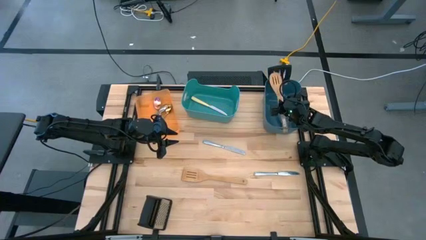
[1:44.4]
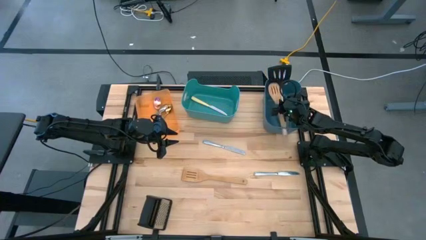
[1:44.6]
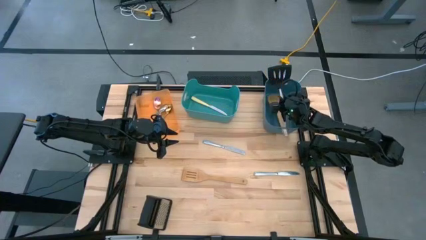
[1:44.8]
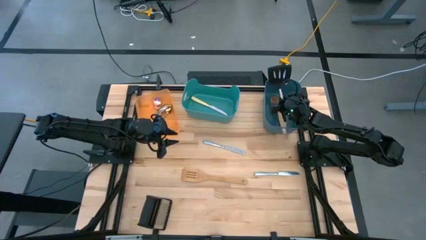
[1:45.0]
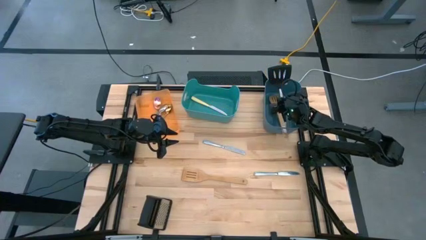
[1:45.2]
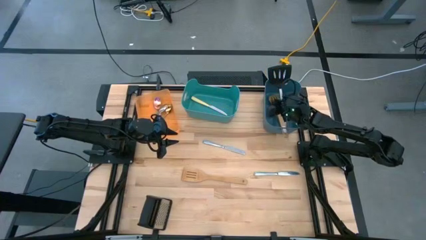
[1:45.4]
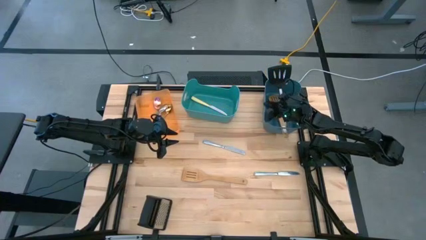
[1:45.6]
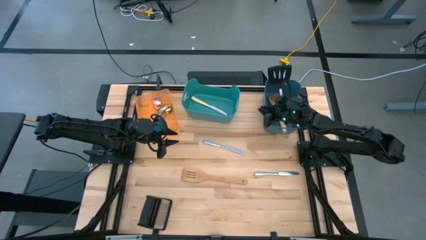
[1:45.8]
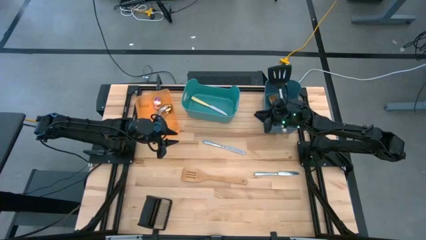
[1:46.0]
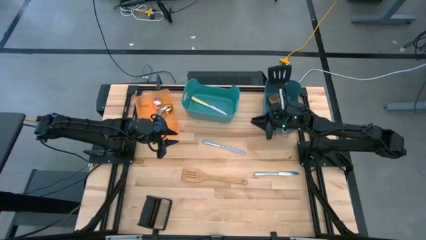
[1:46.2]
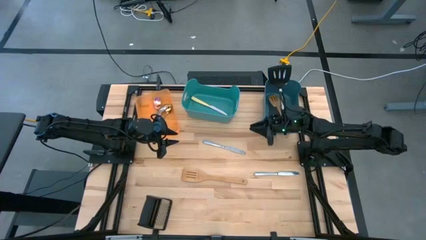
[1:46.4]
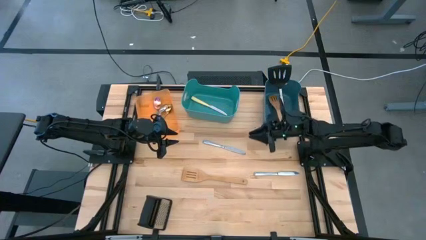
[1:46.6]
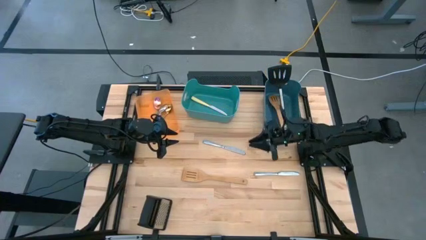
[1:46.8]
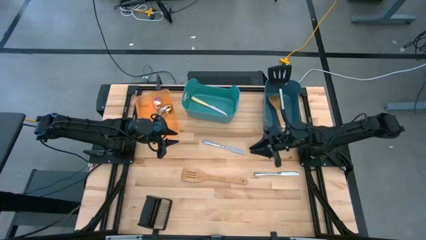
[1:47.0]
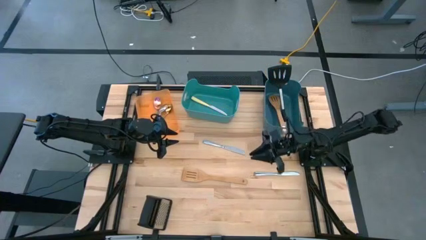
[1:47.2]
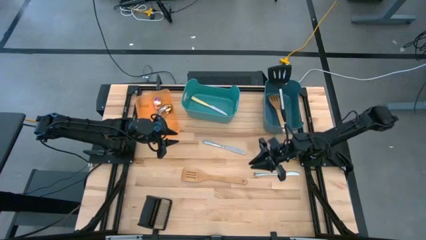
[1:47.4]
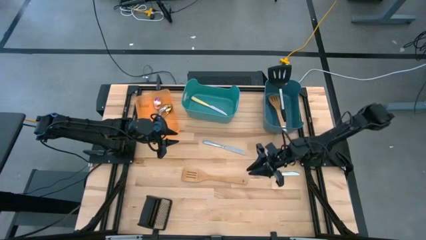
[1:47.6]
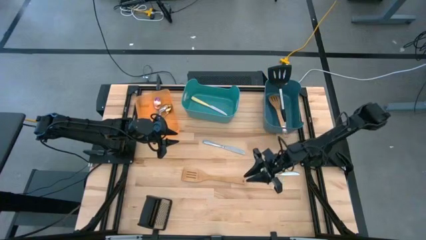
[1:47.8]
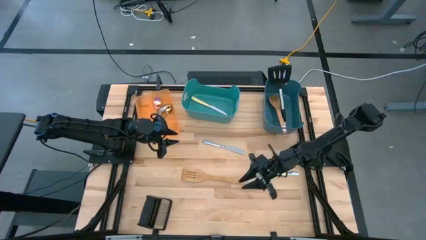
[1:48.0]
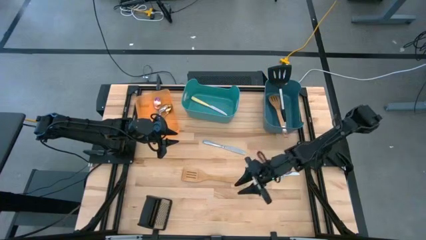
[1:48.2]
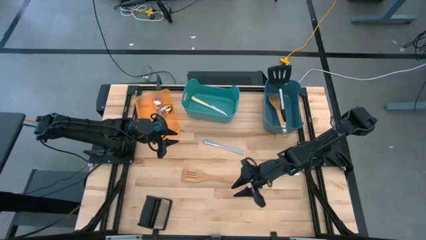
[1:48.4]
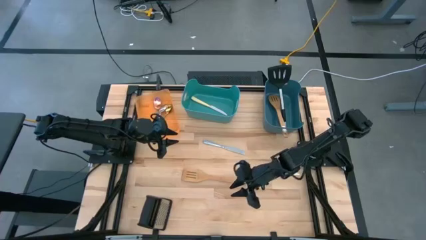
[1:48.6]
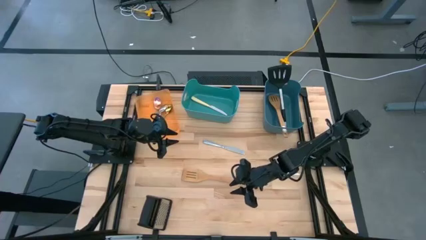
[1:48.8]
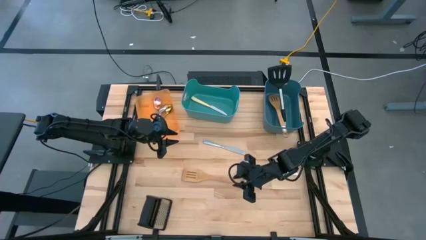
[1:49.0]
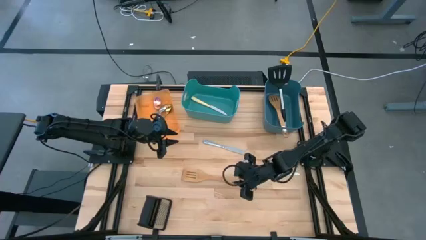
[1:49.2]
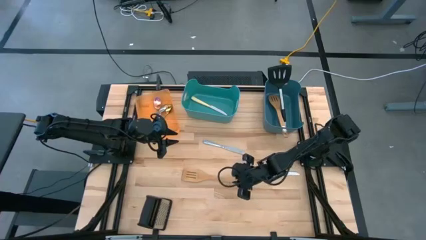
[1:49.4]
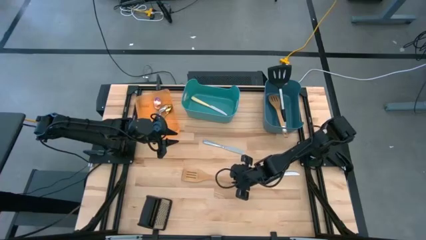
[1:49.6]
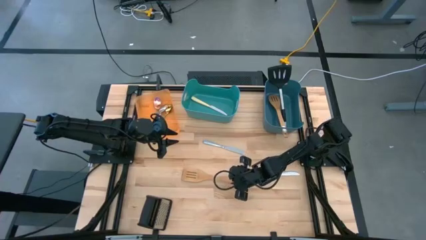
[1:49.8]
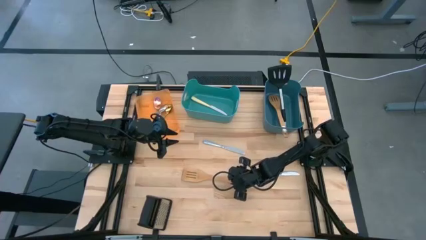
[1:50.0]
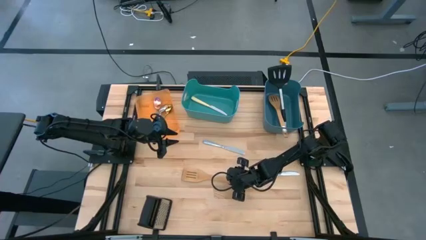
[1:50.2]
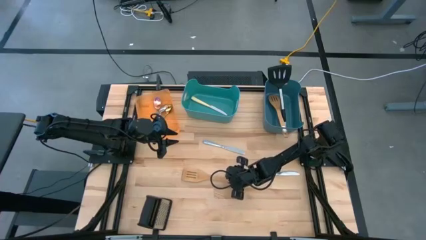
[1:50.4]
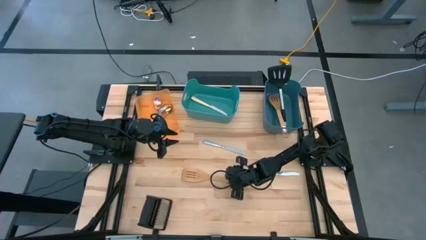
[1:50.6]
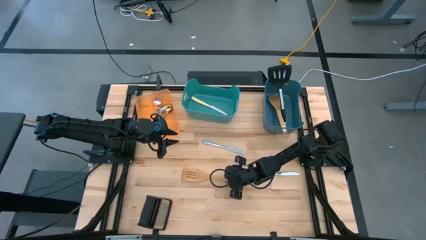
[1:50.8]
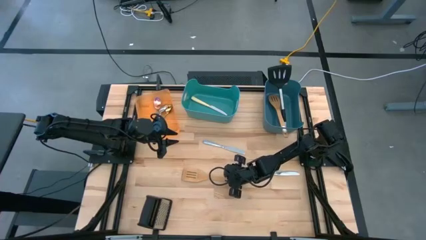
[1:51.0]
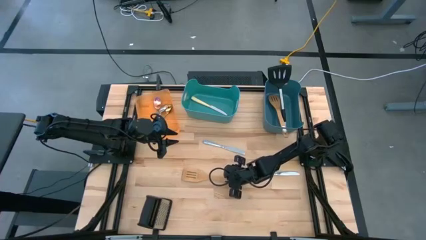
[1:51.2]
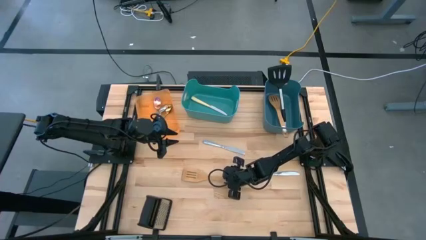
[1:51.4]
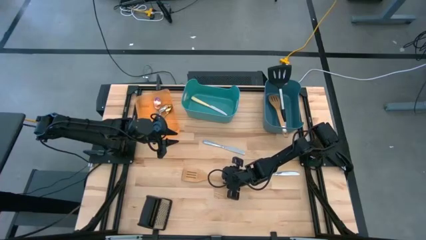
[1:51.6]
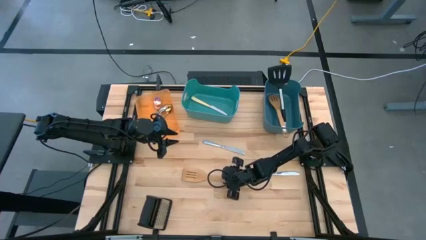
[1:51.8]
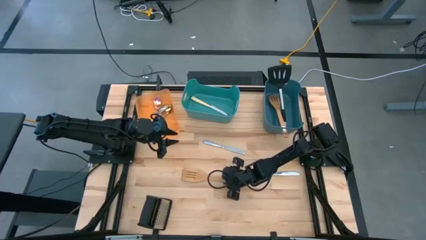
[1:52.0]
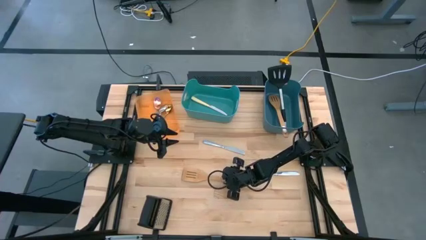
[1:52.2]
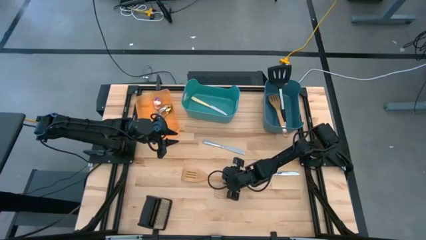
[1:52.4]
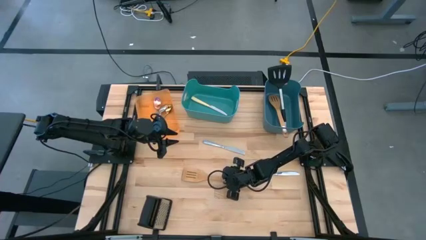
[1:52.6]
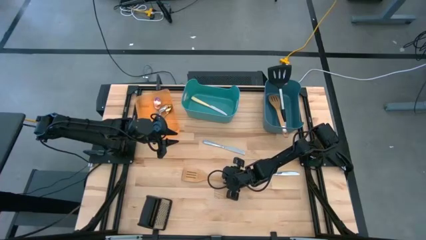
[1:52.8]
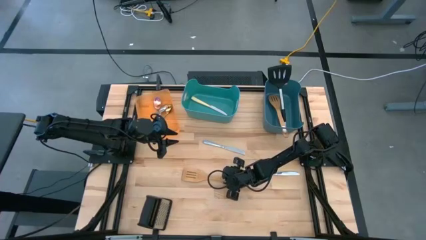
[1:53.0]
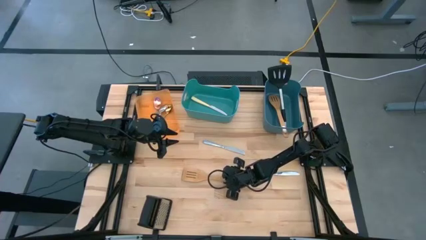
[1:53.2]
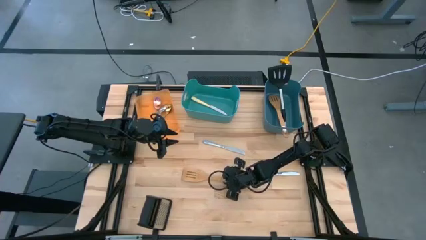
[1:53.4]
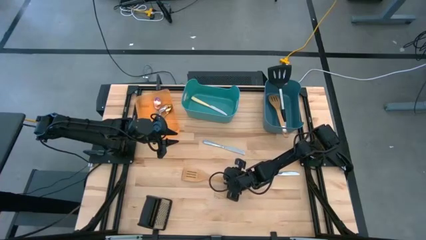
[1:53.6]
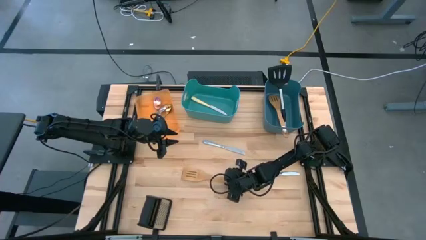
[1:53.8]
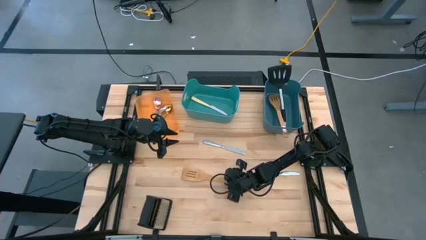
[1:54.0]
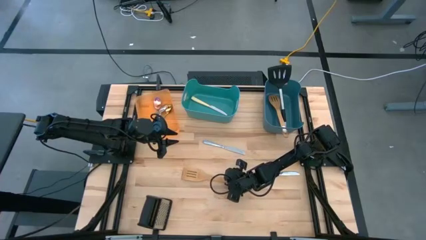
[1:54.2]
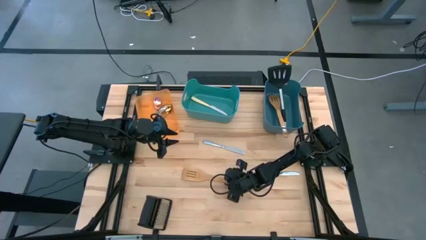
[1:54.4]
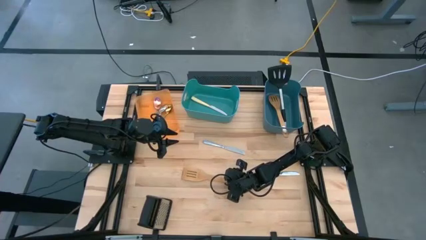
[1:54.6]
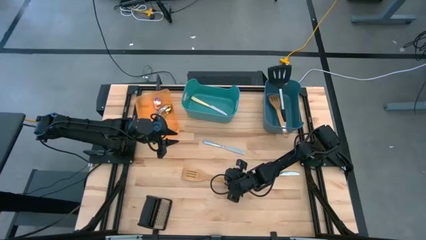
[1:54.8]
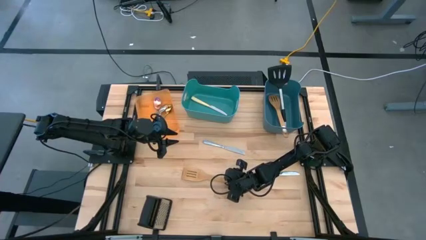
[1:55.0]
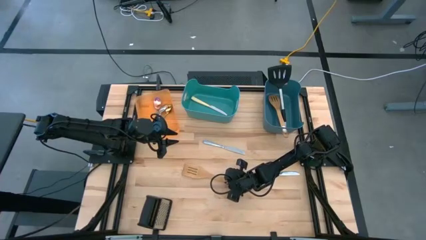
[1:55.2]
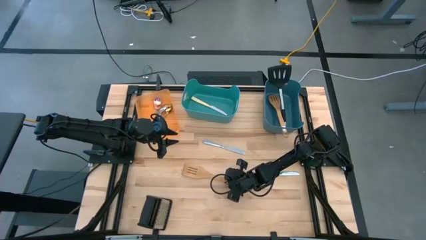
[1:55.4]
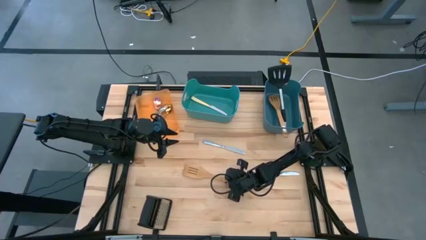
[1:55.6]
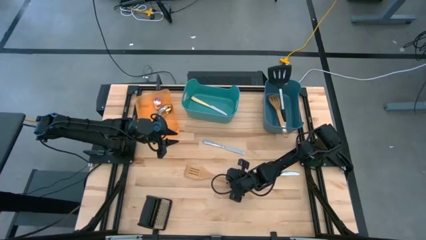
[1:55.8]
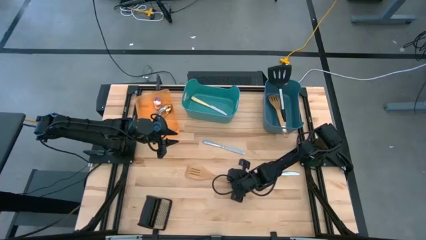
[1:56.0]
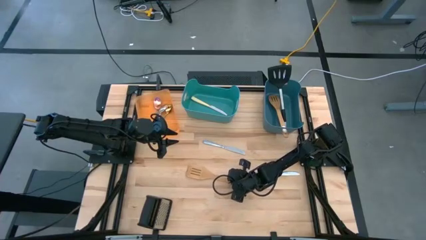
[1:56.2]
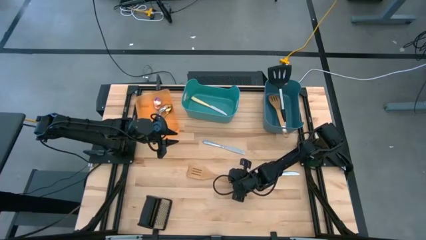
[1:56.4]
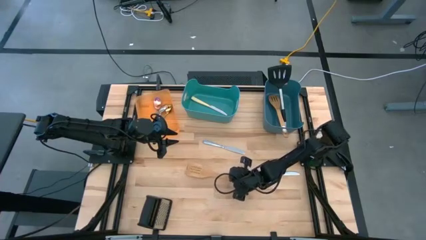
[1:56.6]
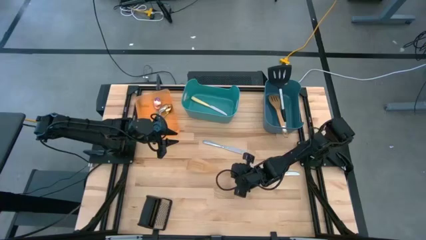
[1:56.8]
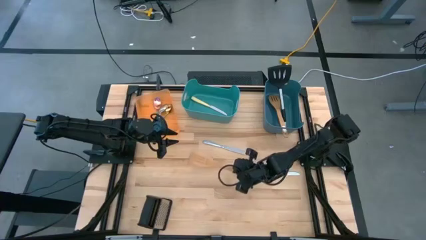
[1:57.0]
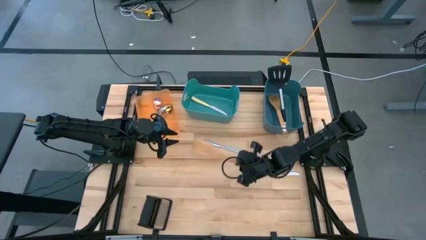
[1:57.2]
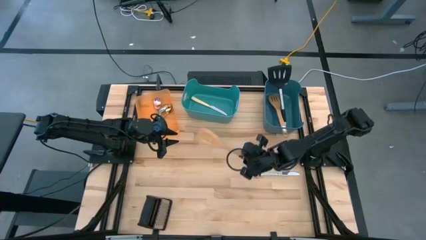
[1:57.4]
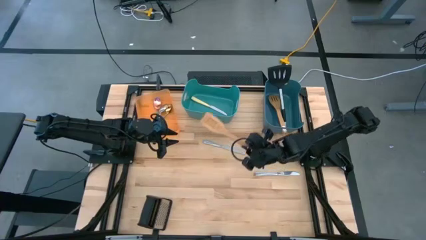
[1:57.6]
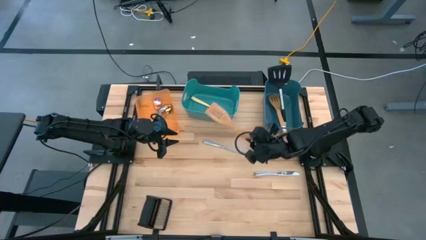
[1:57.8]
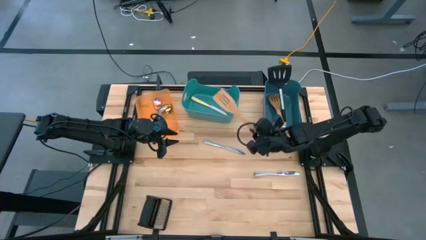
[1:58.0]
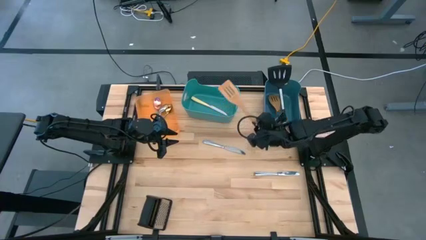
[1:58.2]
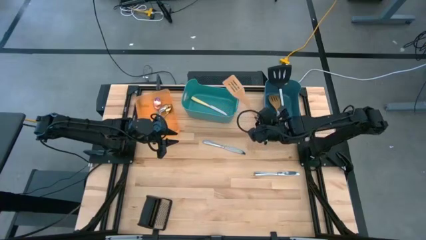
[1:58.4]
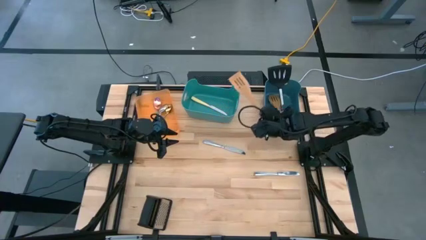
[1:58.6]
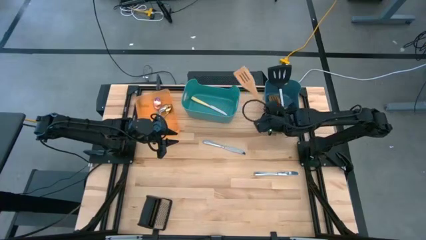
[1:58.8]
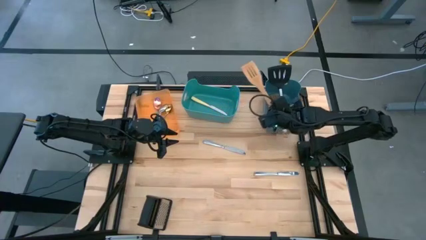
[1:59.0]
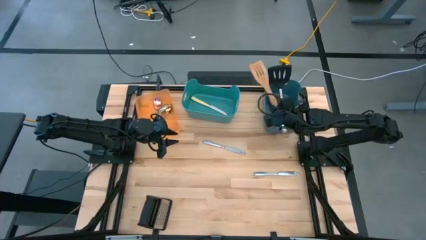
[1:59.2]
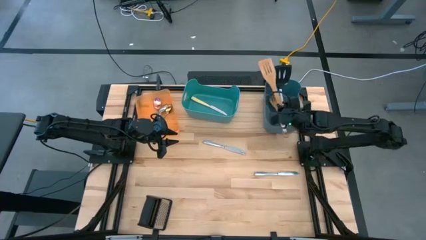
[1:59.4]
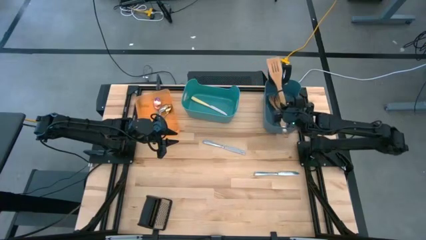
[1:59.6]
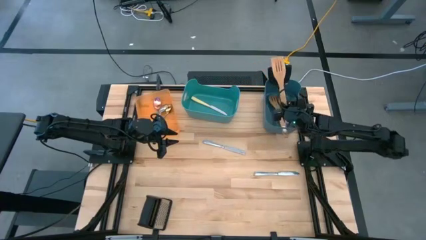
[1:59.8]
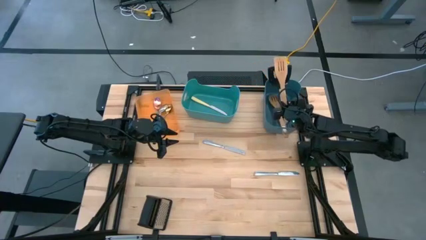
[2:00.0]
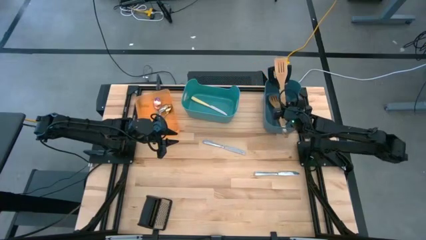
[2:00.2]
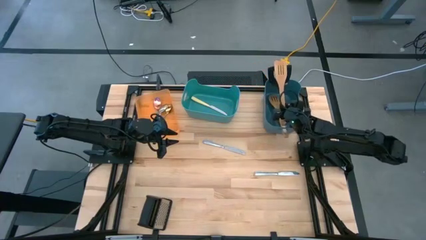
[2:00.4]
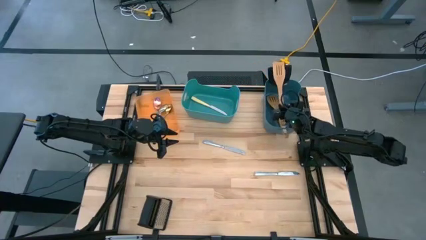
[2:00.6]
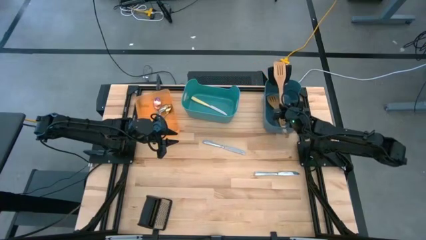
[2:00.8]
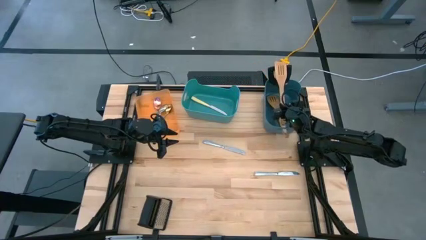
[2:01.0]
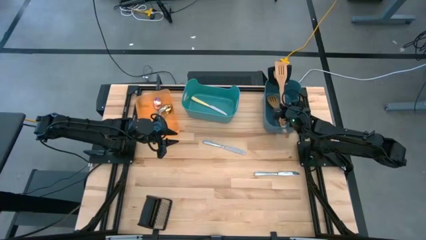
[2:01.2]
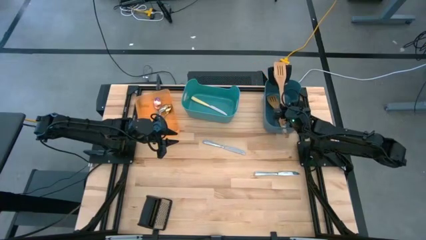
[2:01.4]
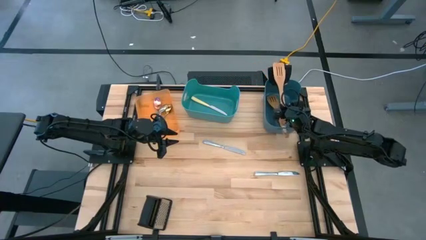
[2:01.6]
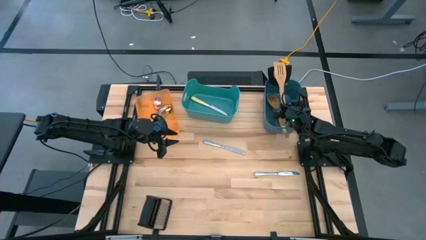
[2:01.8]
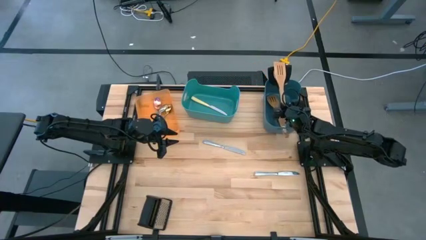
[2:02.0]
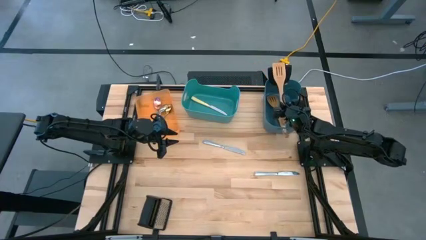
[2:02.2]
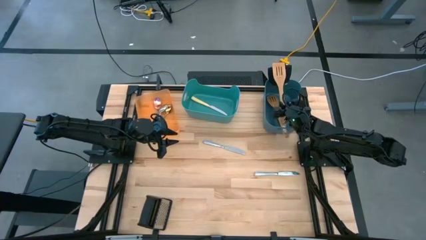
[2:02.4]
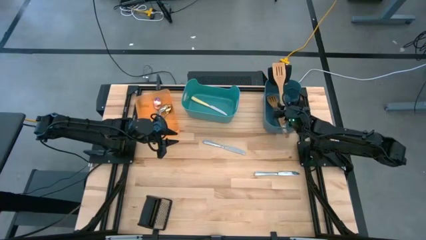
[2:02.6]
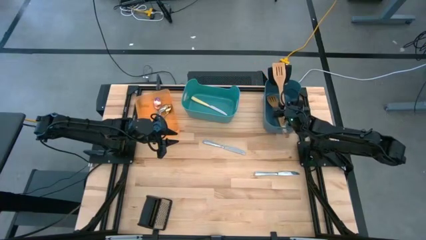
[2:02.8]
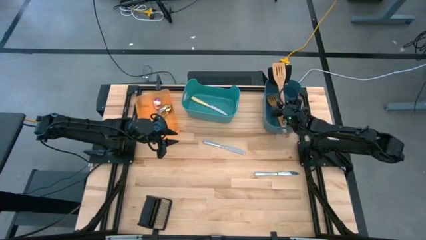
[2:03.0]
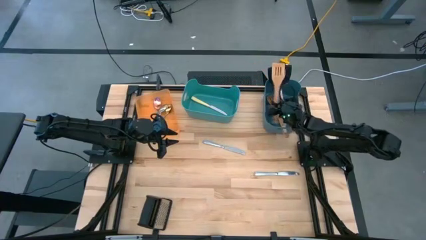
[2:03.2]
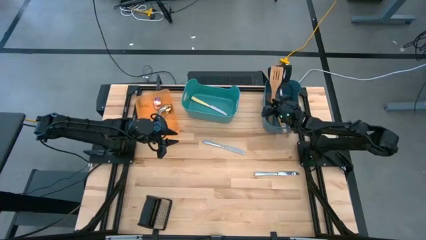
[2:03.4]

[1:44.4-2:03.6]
Task: Pick & Place Kitchen Items
Put the brown spatula into the blue bin
